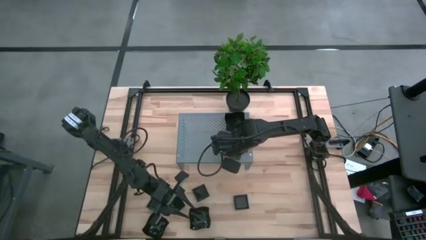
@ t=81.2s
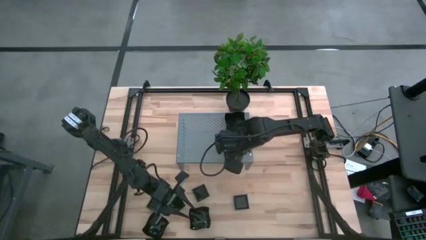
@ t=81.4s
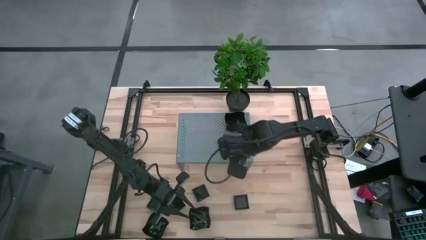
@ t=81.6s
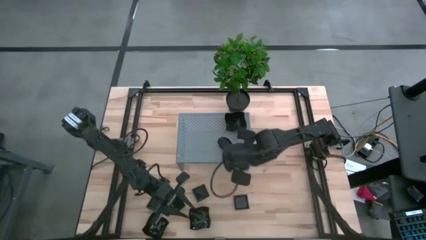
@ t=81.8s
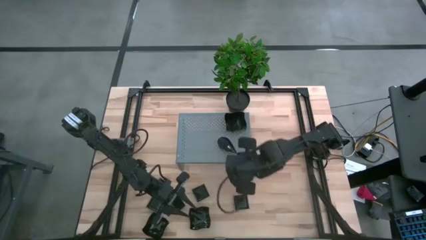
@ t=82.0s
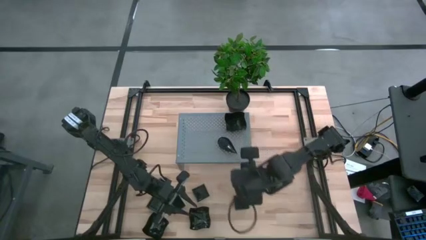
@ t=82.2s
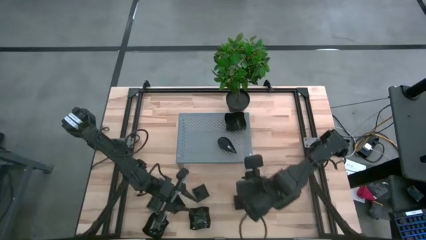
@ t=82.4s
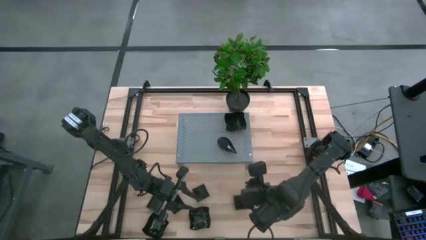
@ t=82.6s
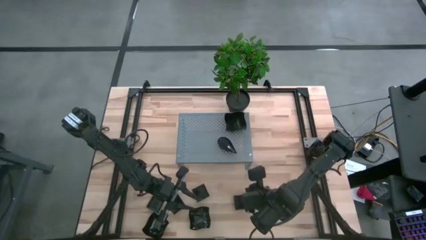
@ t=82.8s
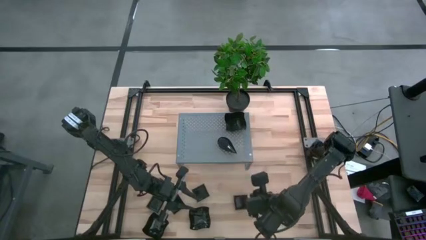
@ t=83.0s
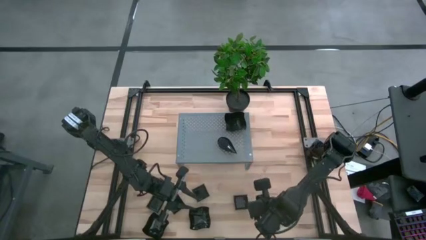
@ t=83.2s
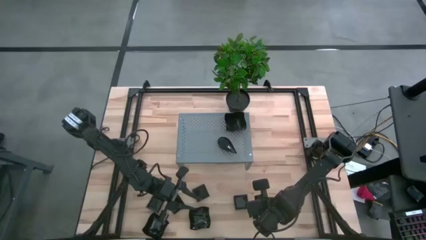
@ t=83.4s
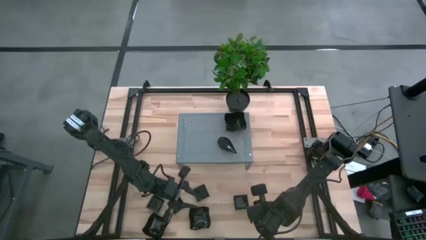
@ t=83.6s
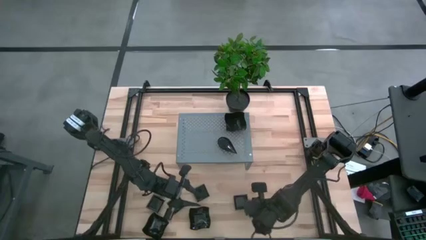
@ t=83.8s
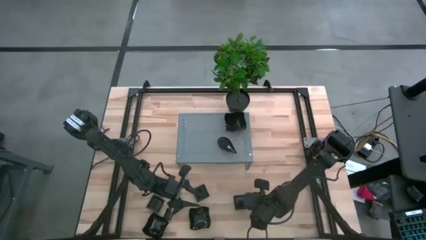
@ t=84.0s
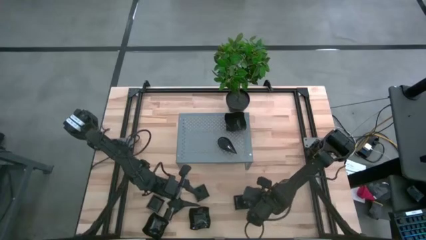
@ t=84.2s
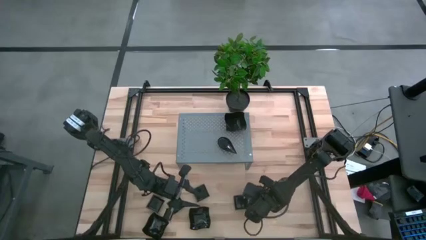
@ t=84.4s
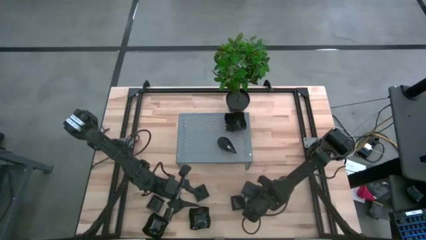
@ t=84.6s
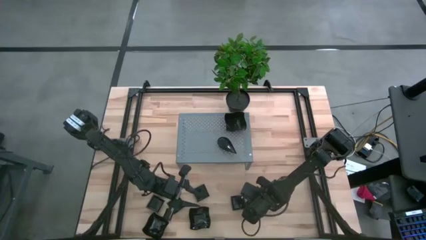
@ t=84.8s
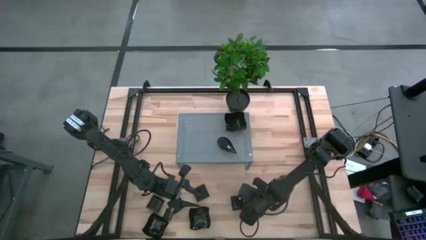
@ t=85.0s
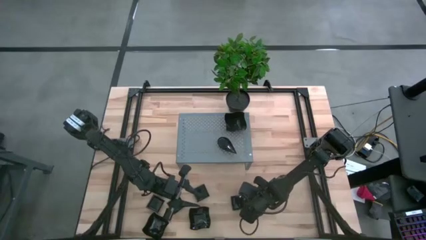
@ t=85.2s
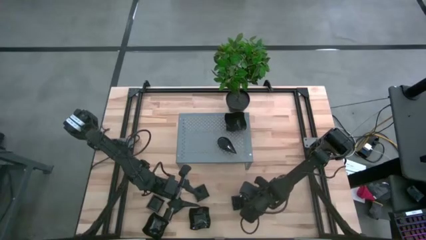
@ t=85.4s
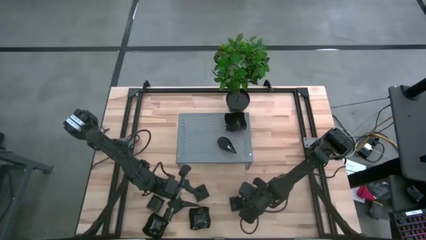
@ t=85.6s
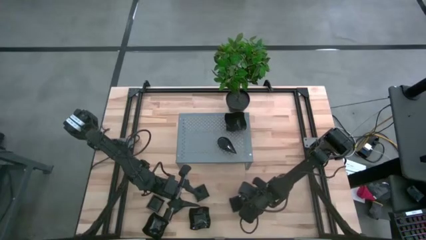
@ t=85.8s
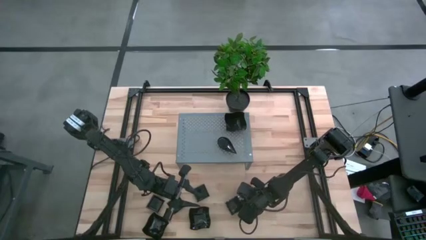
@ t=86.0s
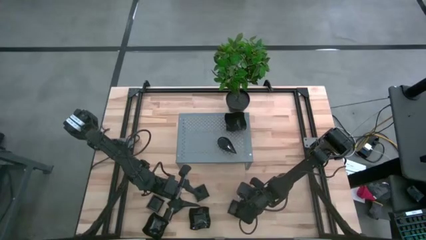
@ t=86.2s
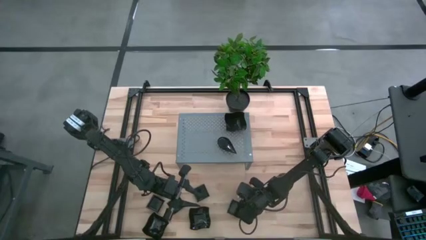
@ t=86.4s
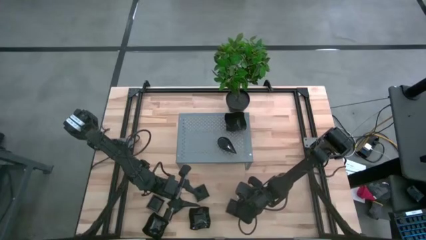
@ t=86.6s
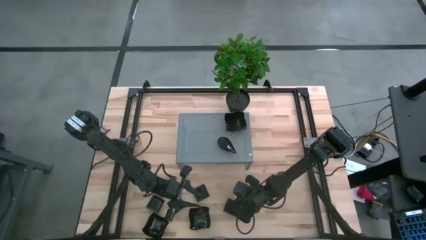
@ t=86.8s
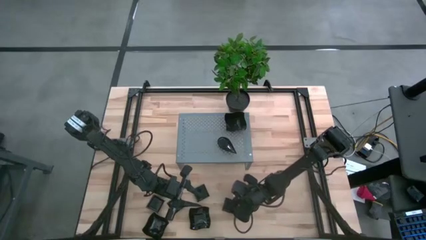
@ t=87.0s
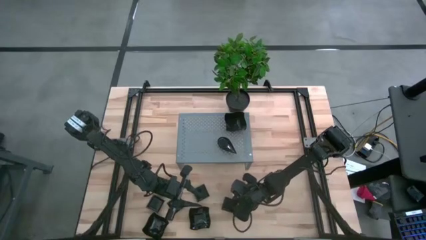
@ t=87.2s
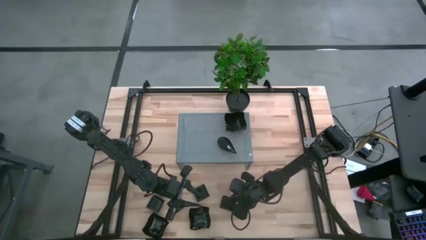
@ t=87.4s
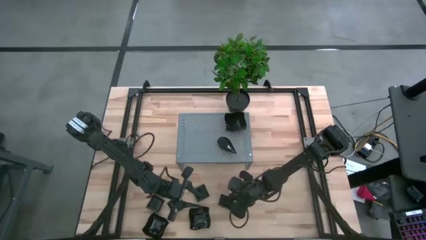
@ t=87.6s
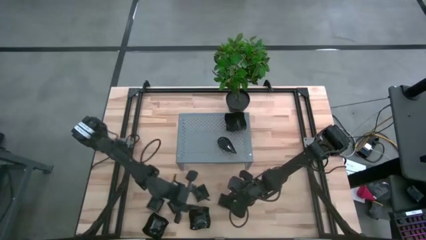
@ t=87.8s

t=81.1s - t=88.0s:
Task: Pick & Place Mini shaped plates
Put the black square plate on the shelf

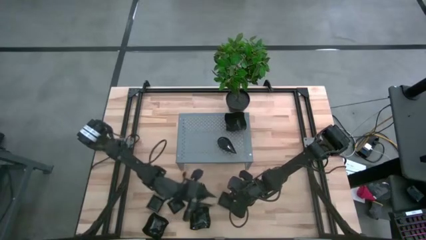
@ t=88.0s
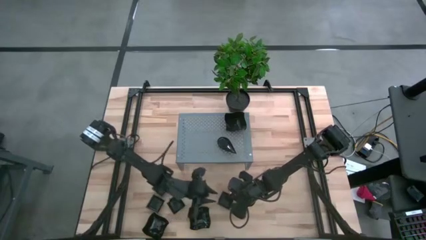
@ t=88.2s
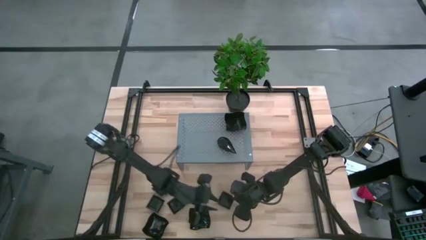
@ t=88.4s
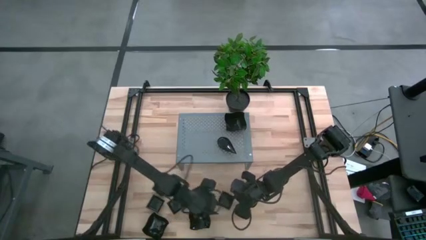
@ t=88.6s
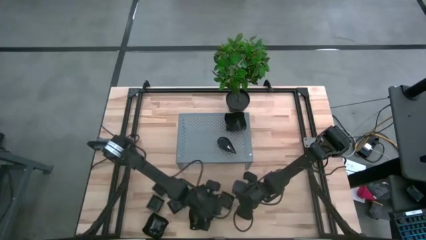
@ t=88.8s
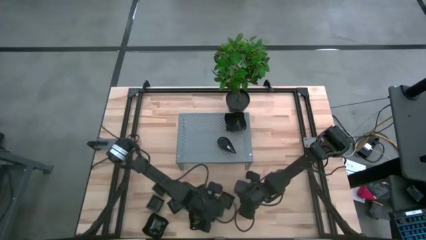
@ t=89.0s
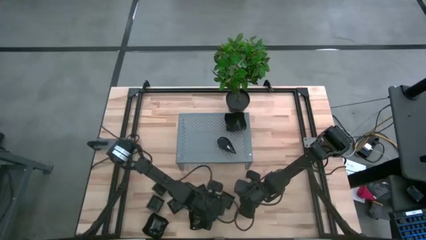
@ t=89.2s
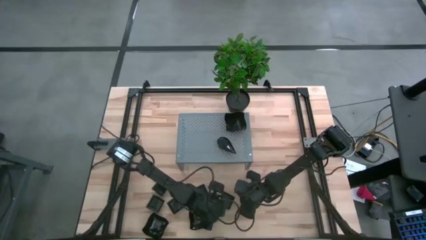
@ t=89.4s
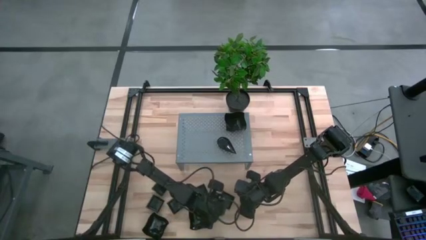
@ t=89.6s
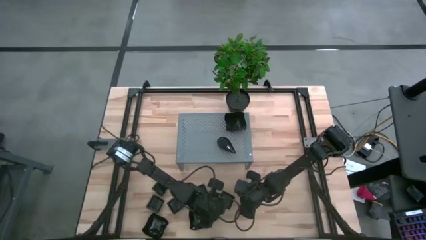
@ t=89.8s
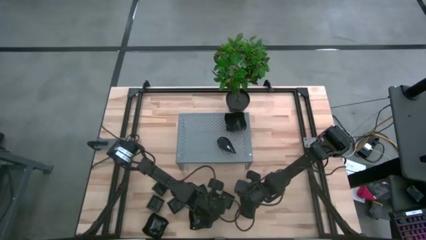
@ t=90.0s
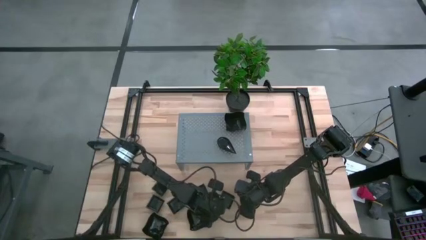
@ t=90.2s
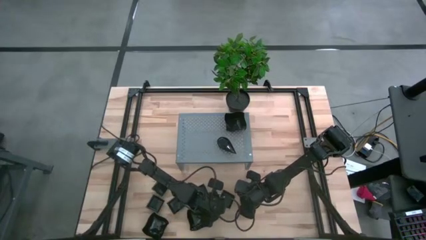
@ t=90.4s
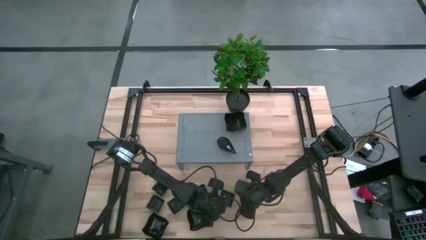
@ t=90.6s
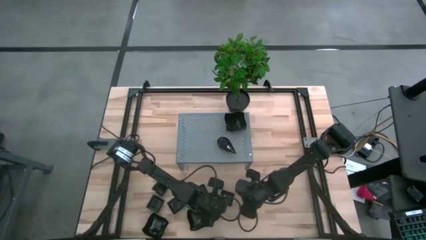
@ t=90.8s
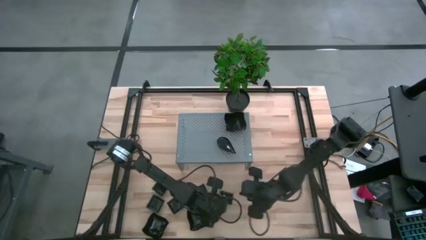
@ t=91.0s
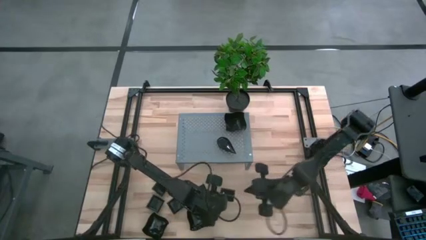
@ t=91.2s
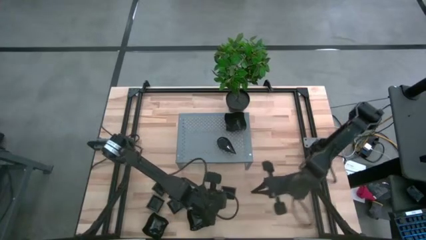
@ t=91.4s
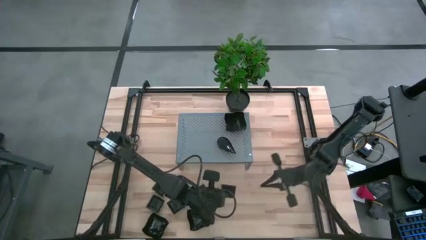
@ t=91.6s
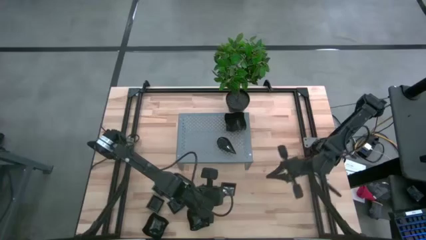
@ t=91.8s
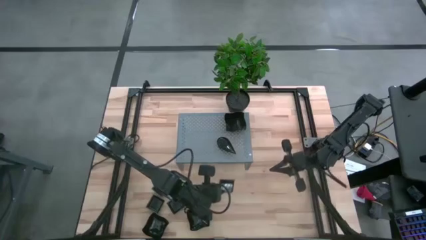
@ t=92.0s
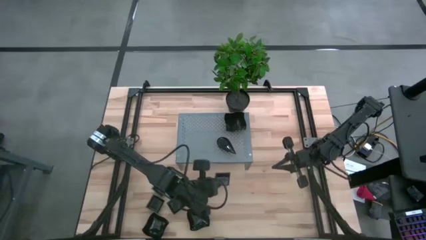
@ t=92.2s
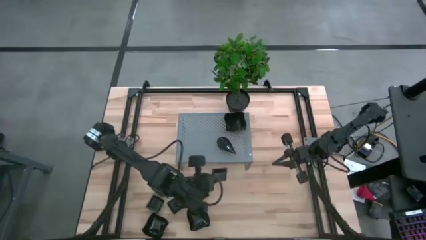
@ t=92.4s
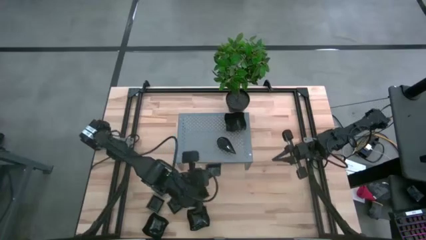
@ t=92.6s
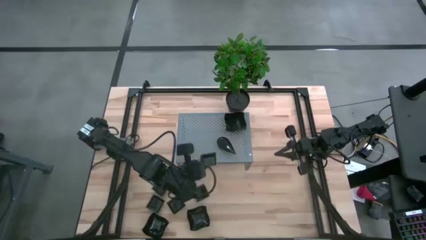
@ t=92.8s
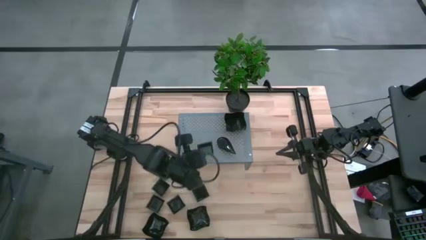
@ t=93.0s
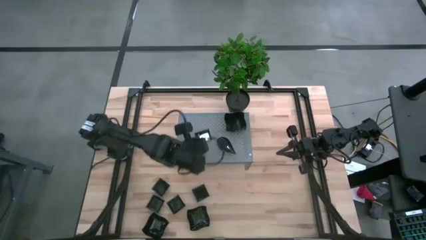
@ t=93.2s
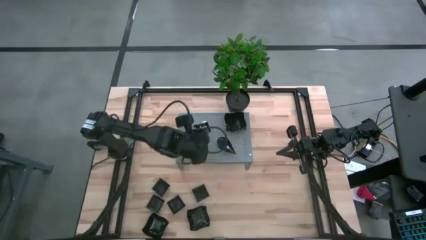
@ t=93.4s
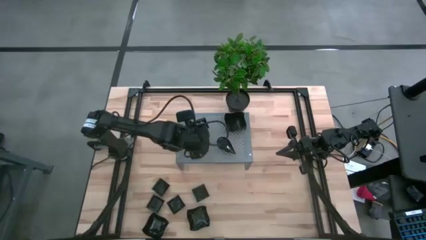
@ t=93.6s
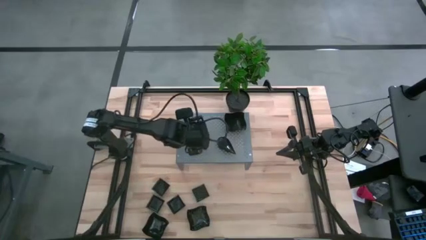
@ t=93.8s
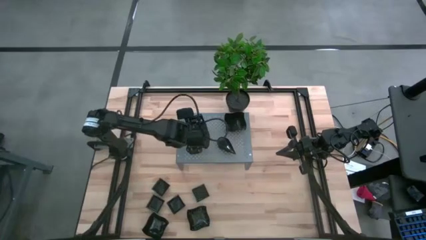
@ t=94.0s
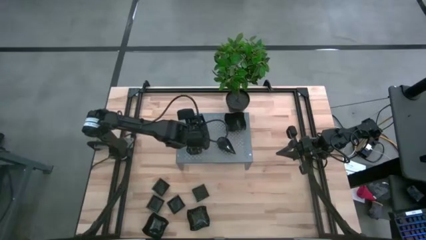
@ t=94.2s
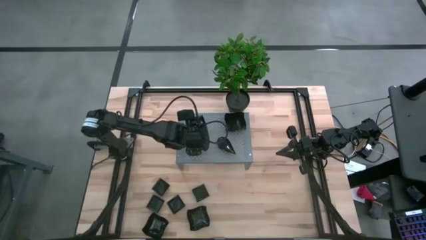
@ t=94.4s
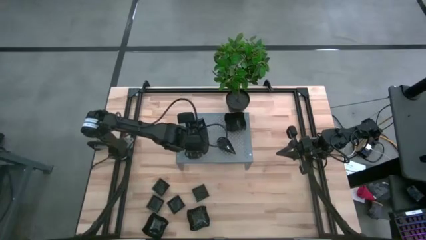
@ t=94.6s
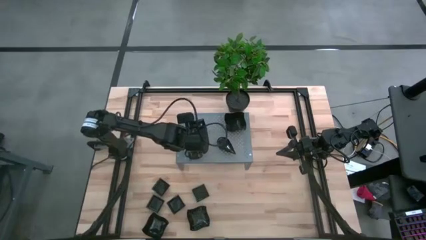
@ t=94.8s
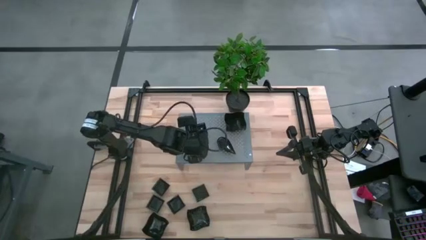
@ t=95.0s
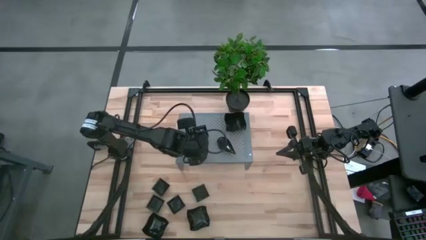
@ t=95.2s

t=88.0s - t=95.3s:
Put the black square plate on the shelf
